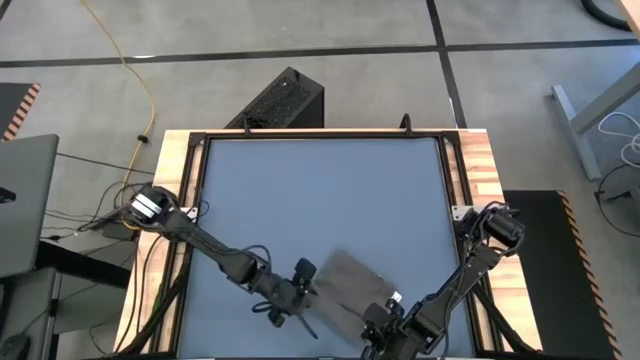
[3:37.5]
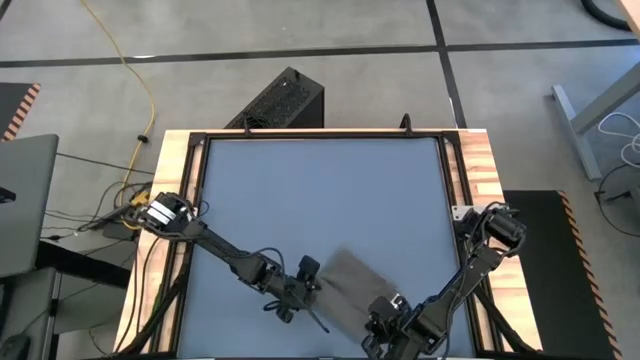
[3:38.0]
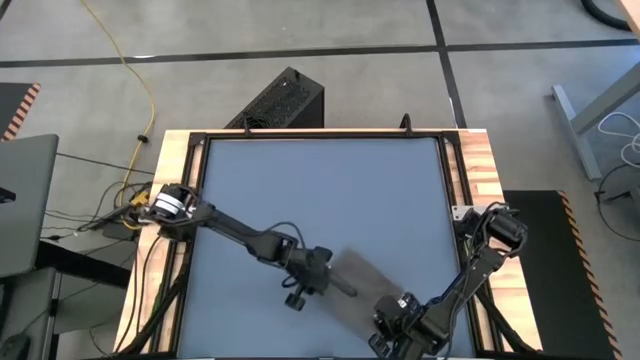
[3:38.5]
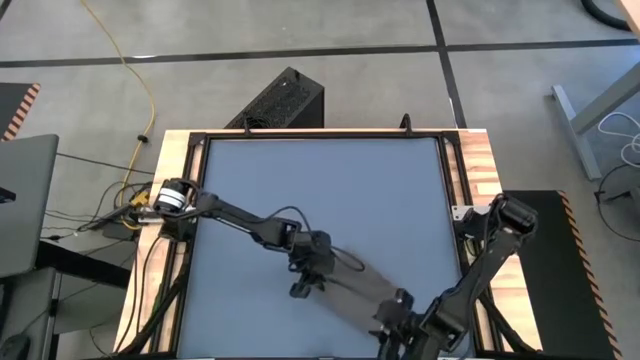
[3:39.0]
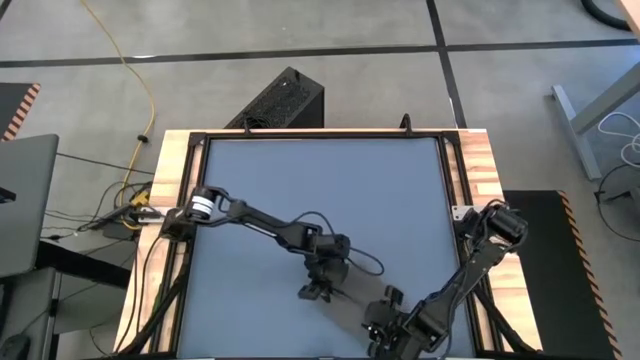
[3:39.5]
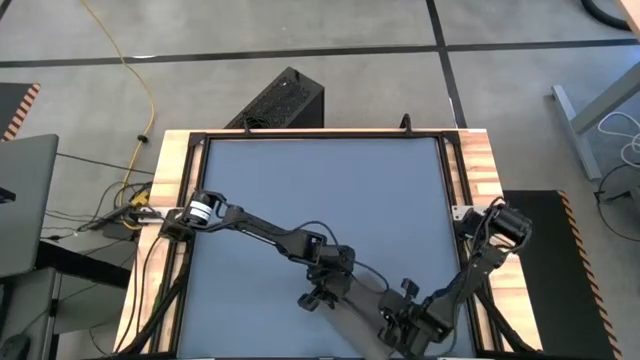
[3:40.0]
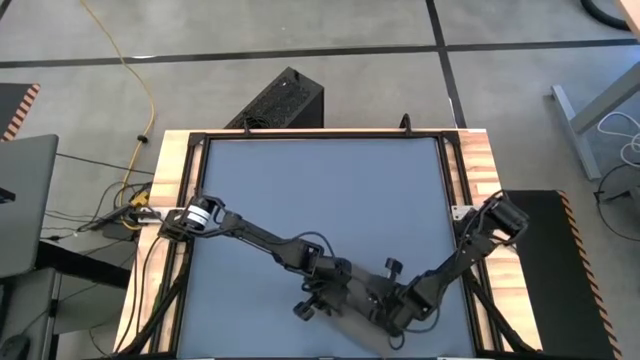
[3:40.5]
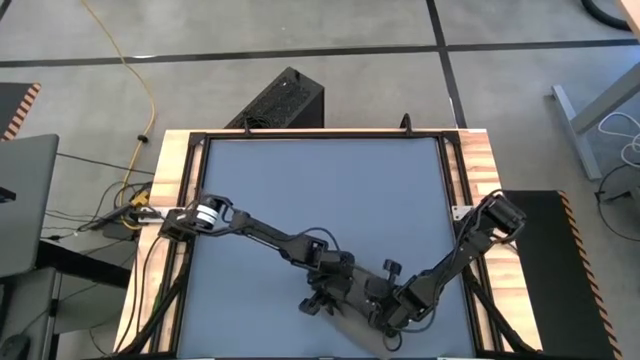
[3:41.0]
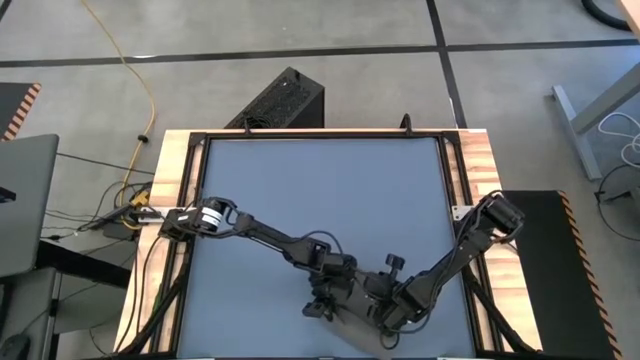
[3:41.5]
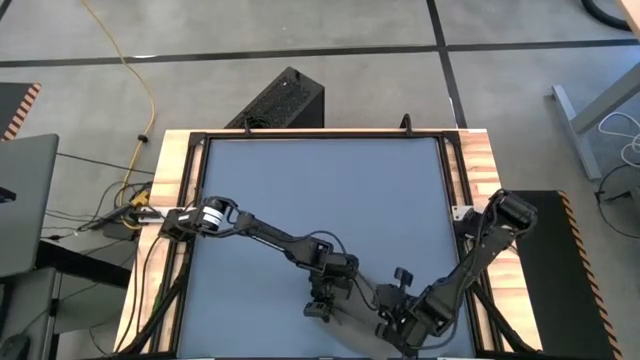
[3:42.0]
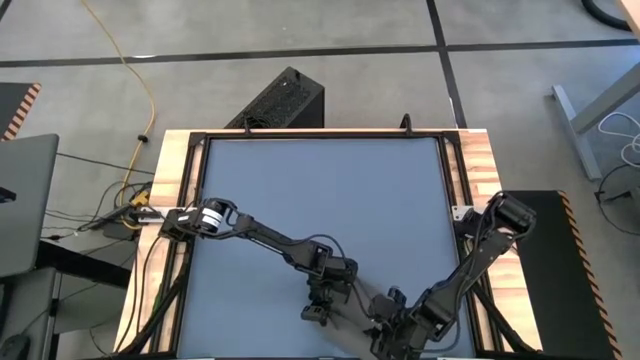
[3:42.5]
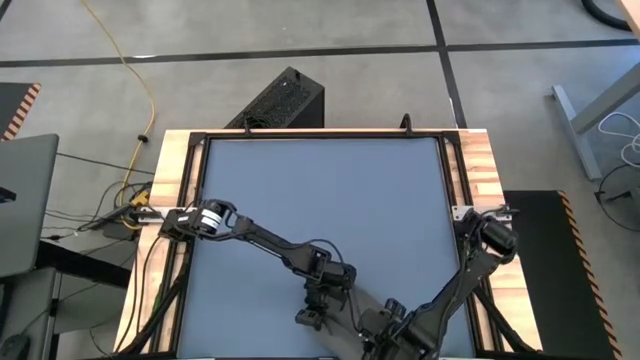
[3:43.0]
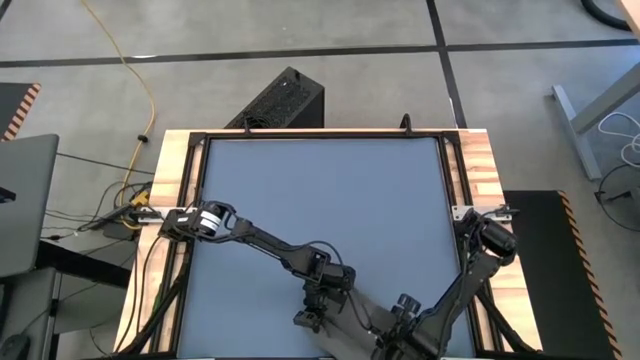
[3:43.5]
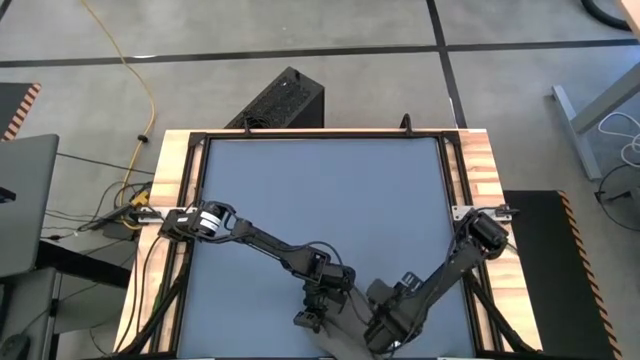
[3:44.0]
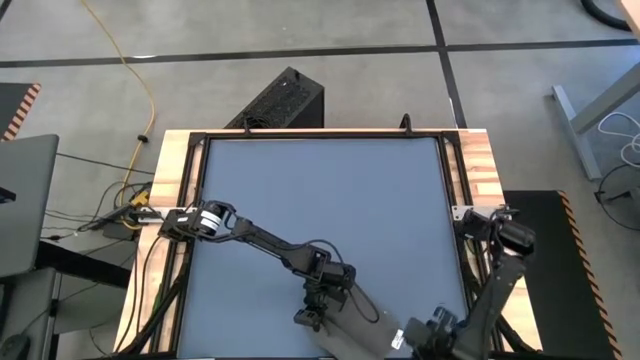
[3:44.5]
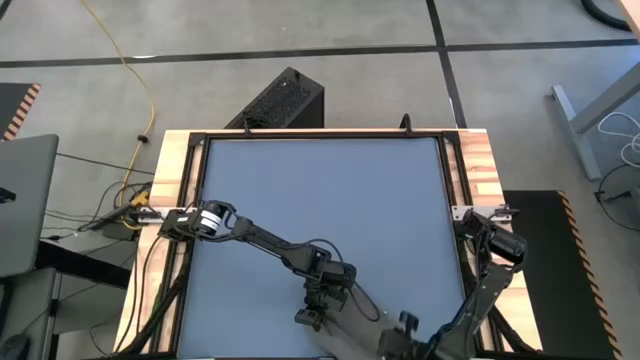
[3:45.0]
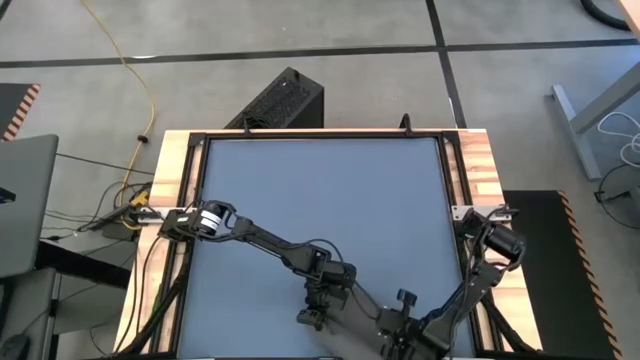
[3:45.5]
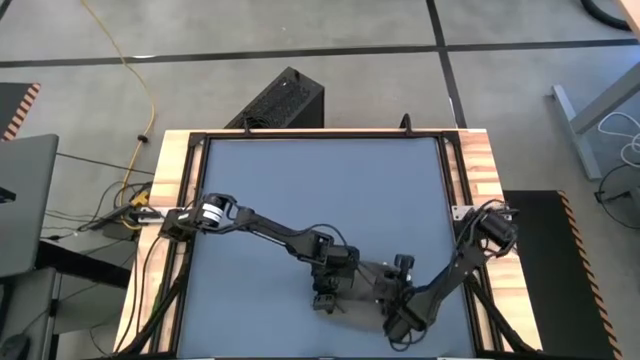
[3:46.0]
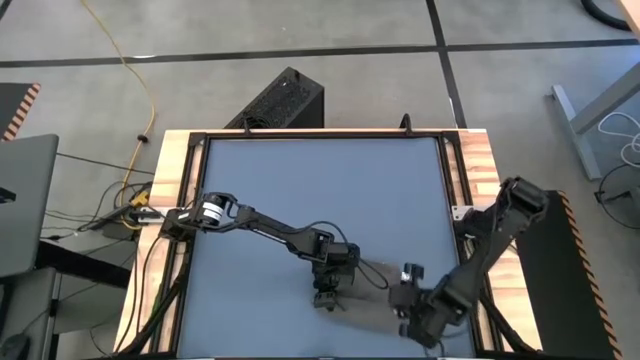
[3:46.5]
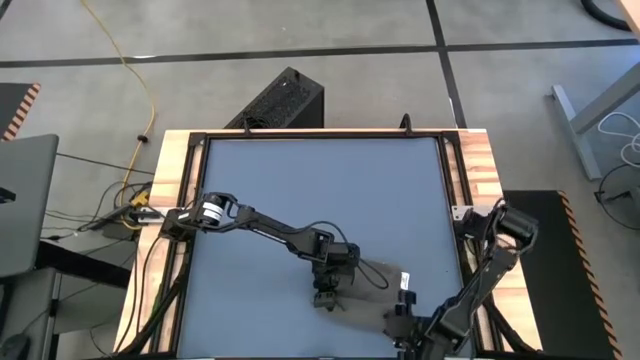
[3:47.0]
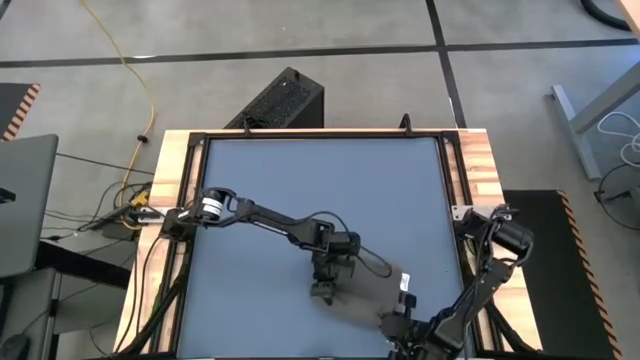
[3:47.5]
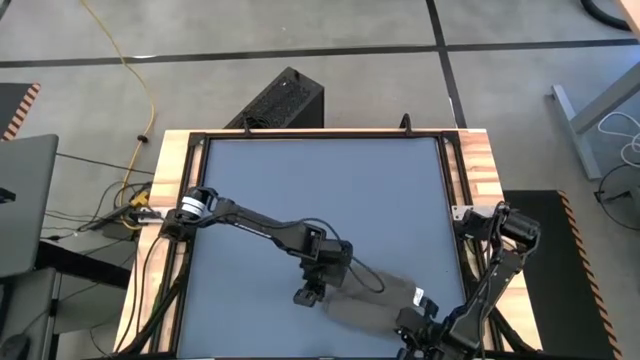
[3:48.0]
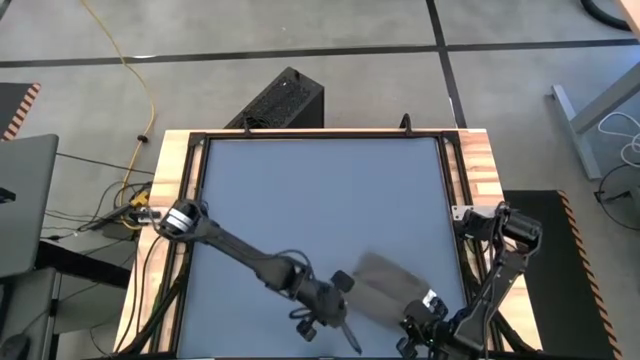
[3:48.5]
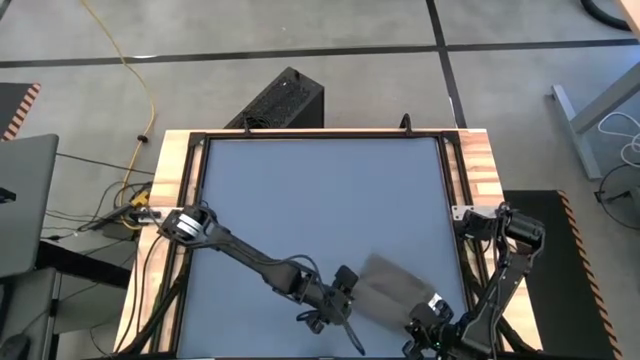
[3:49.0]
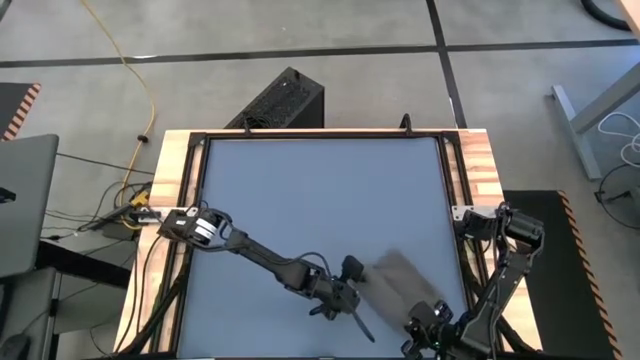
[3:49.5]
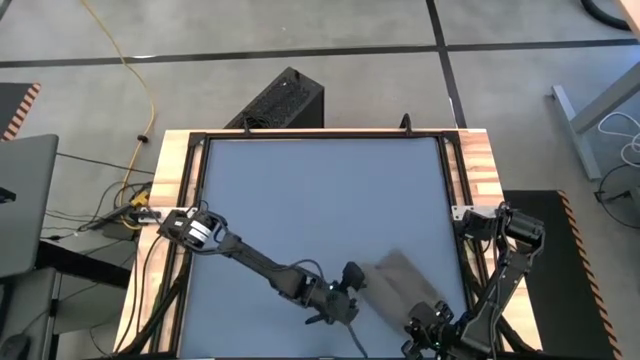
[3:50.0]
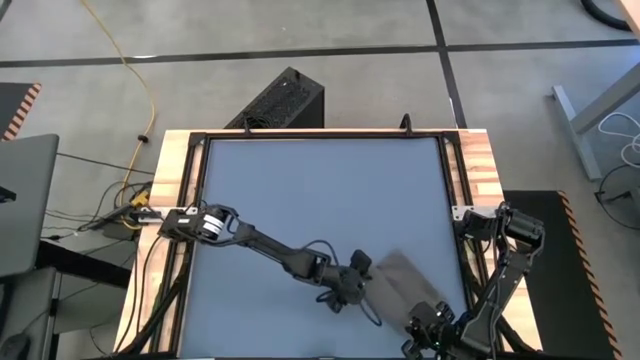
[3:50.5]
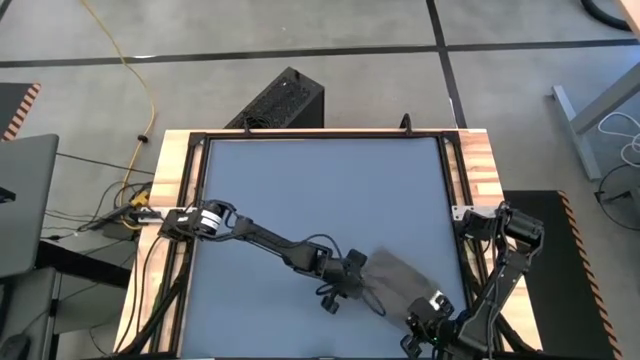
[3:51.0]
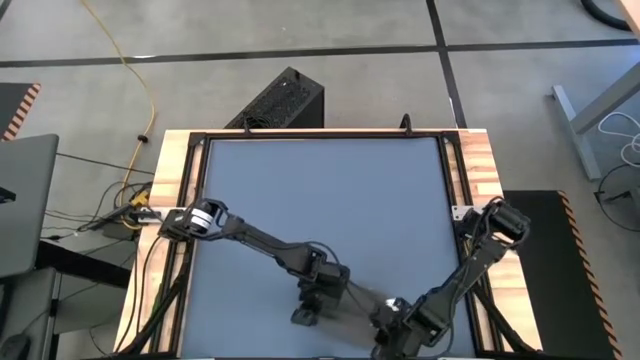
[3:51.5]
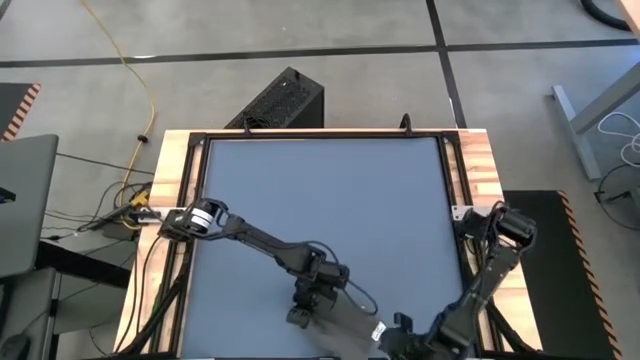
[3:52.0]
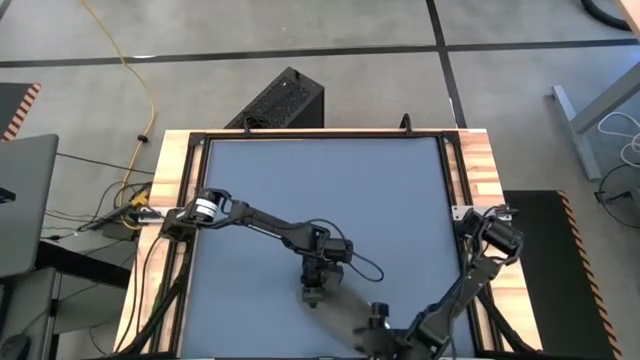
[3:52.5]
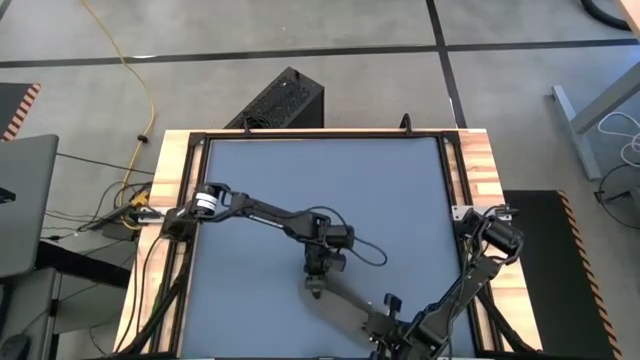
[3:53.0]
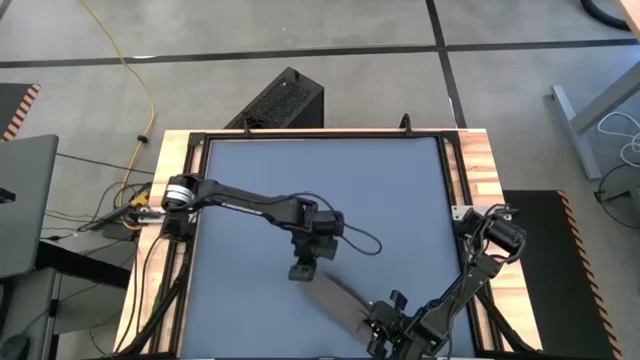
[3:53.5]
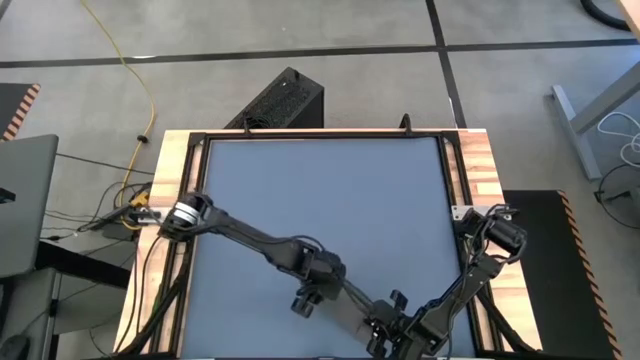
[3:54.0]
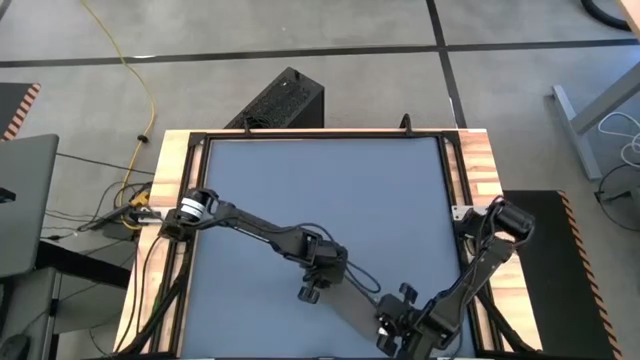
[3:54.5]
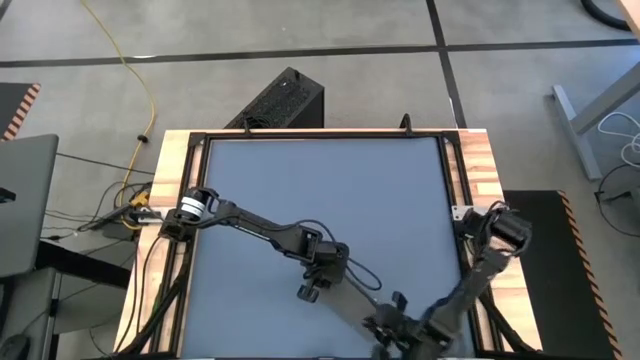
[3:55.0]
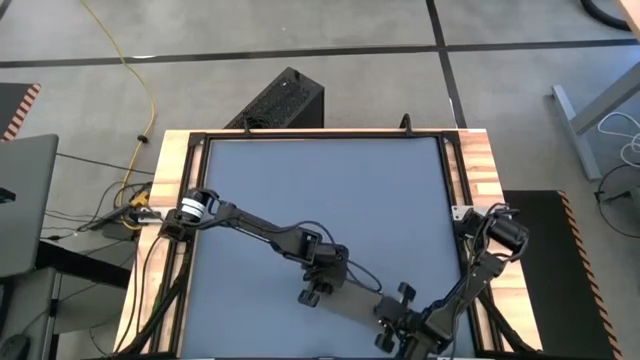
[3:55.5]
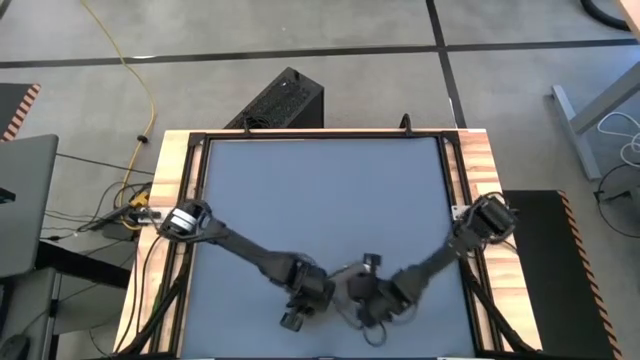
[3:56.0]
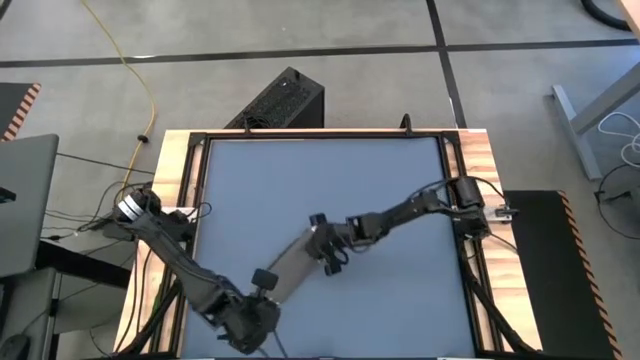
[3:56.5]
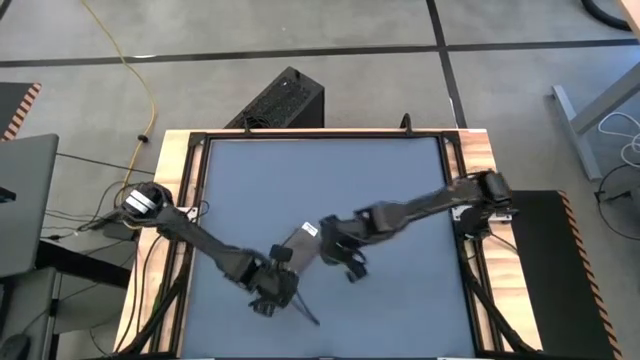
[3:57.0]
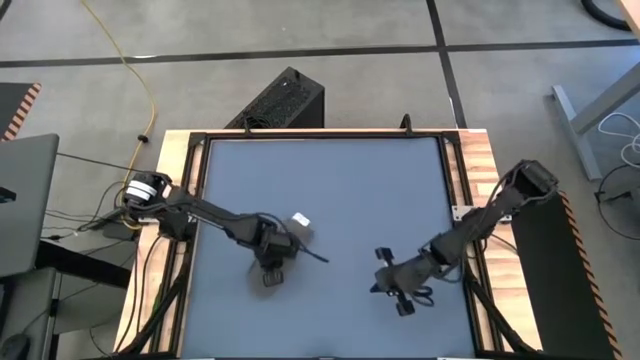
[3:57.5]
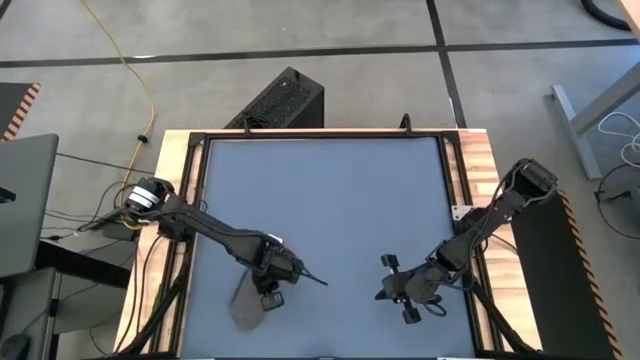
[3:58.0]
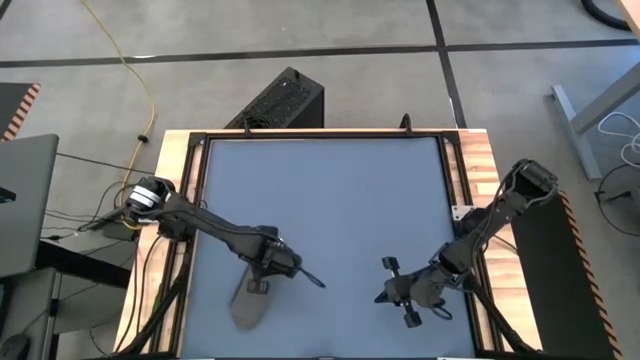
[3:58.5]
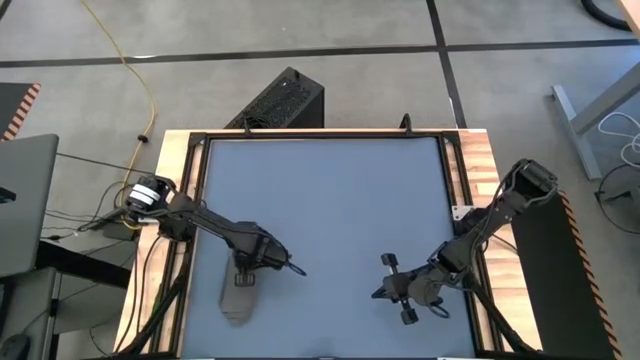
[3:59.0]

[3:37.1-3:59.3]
Task: Roll towel
Roll the gray towel
